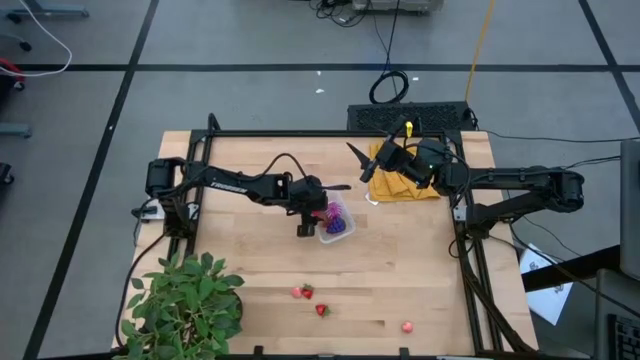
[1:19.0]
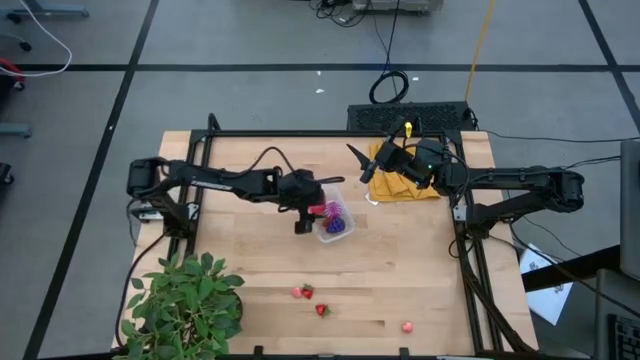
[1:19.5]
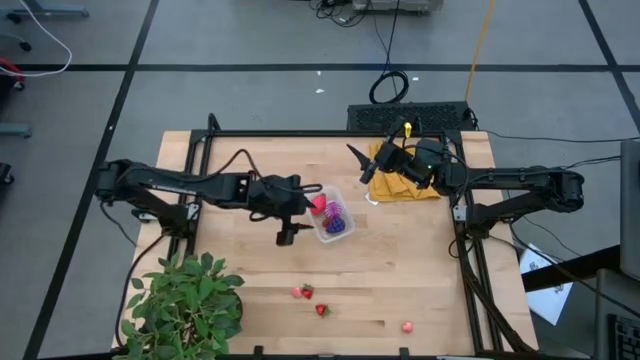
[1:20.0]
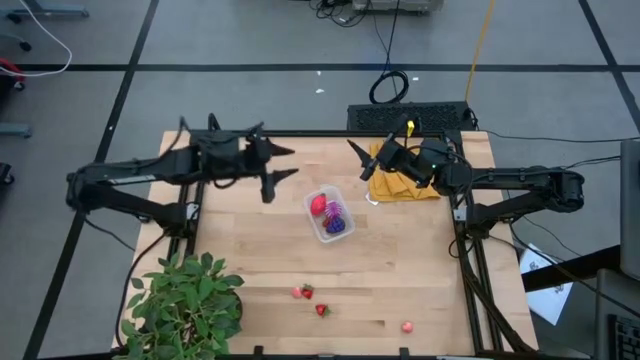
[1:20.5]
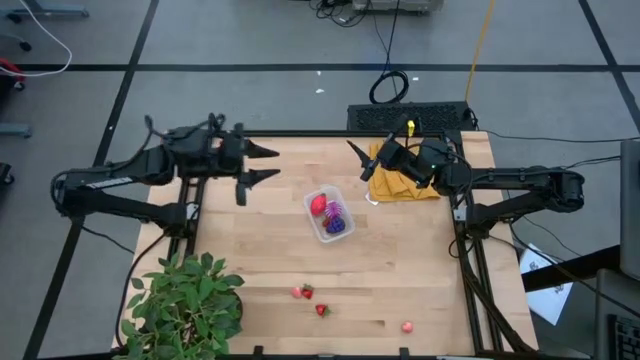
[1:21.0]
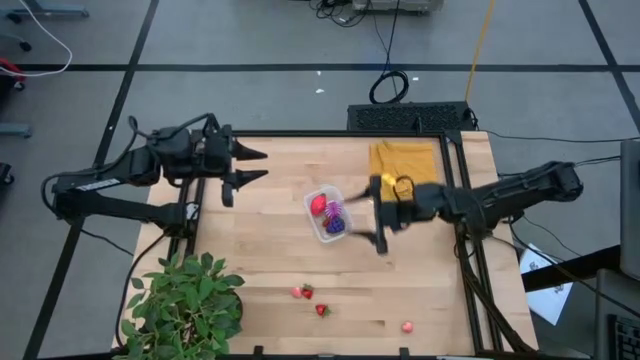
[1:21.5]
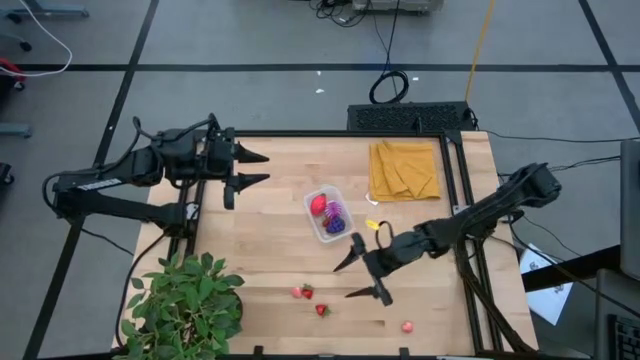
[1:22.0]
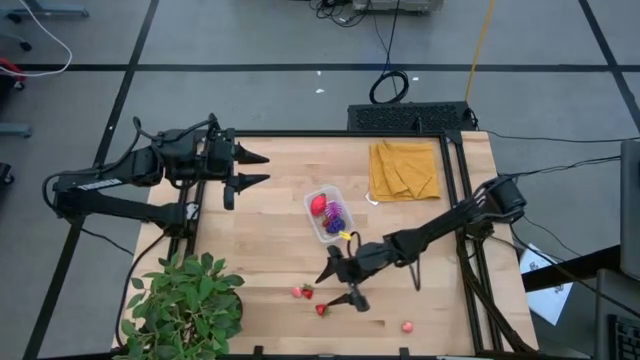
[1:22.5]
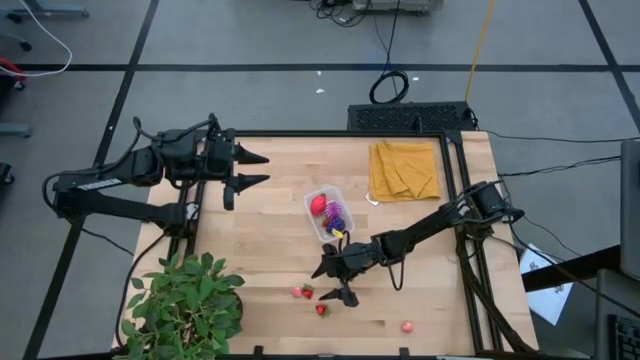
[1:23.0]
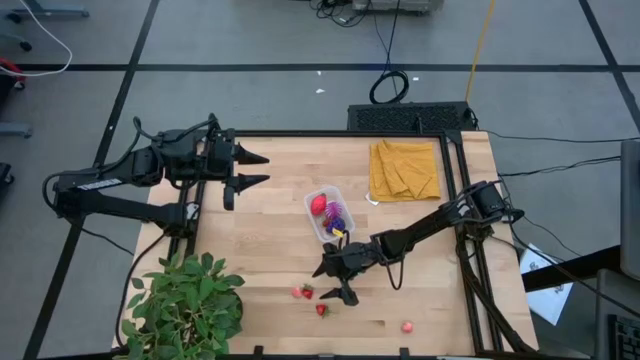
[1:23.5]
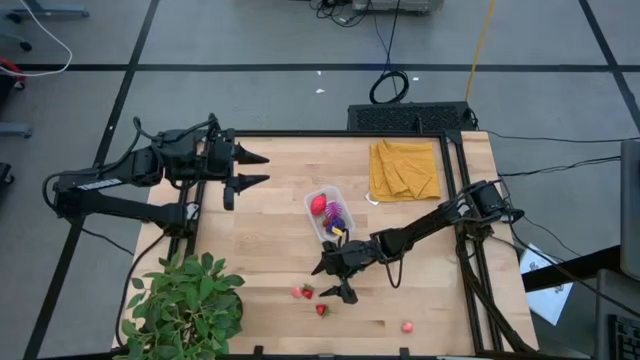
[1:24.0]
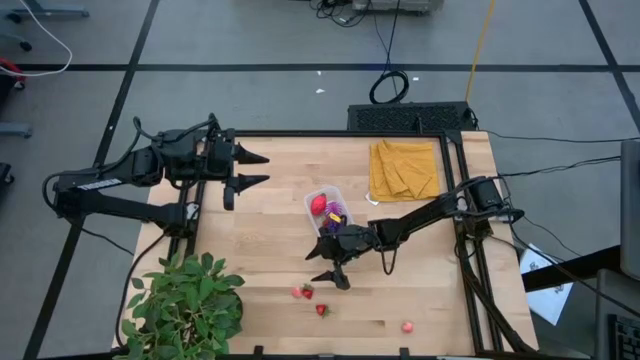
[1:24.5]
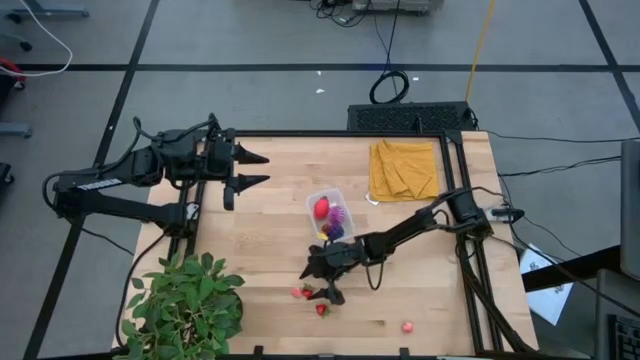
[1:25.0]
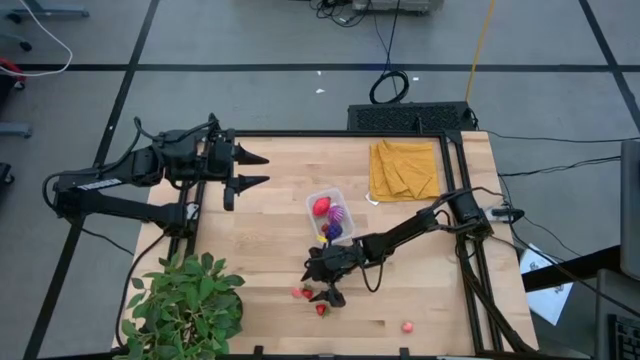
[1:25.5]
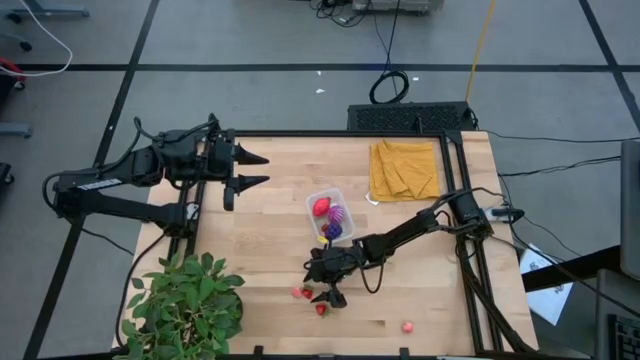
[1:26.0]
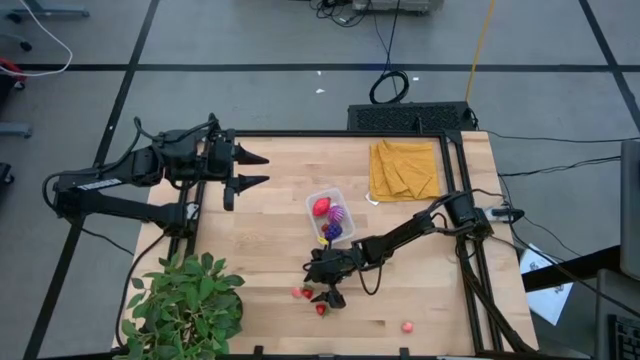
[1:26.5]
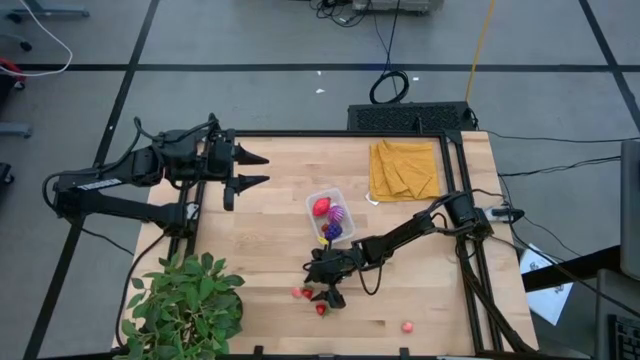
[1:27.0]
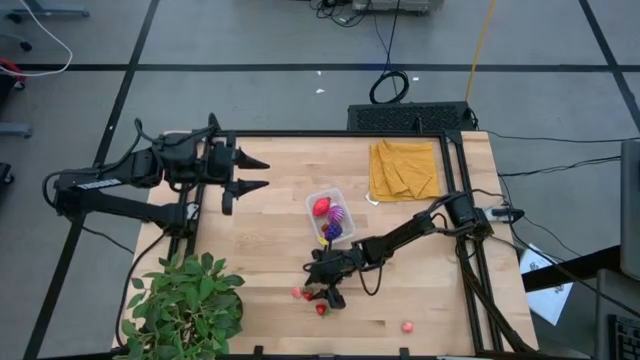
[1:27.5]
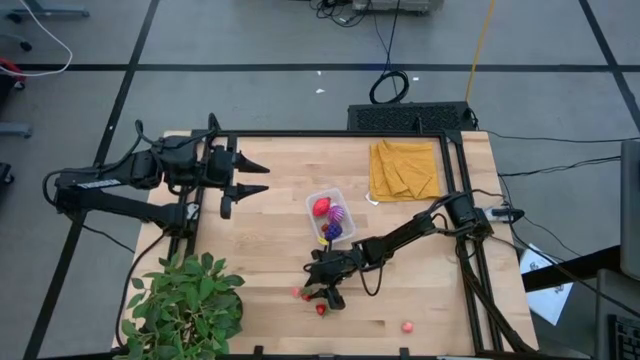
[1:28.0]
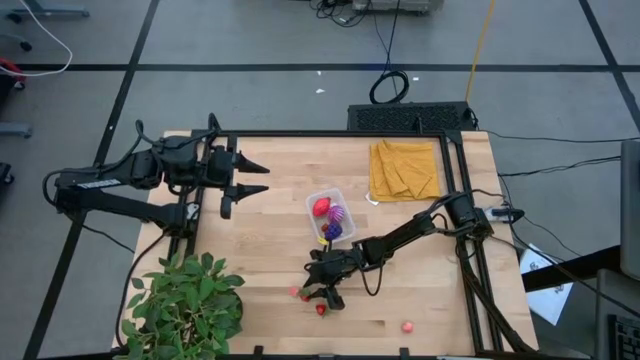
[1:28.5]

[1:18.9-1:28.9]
Task: Pick and placing Produce into tupperware
Put the top red strawberry into the transparent container

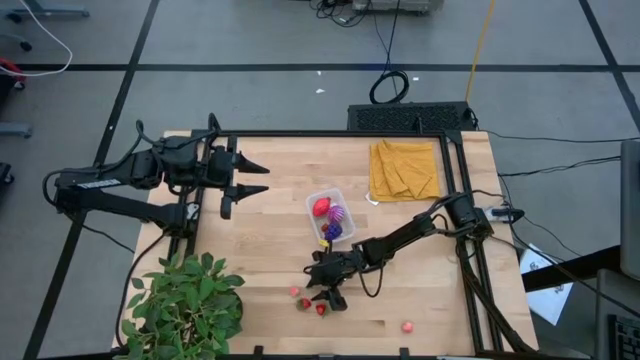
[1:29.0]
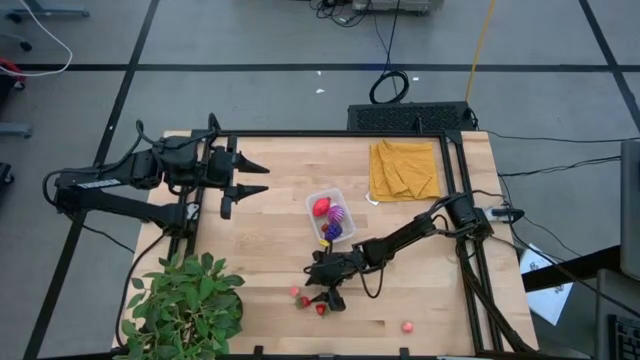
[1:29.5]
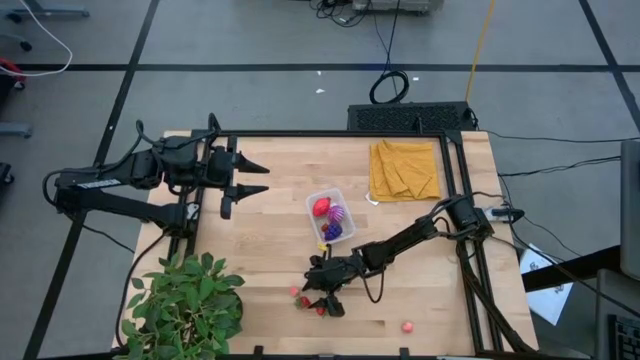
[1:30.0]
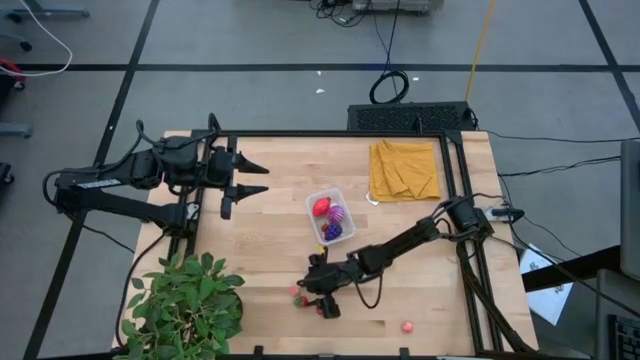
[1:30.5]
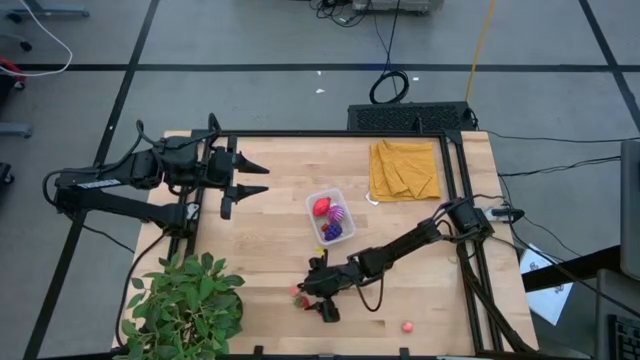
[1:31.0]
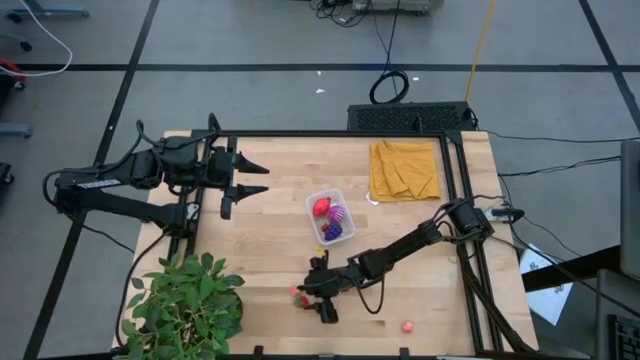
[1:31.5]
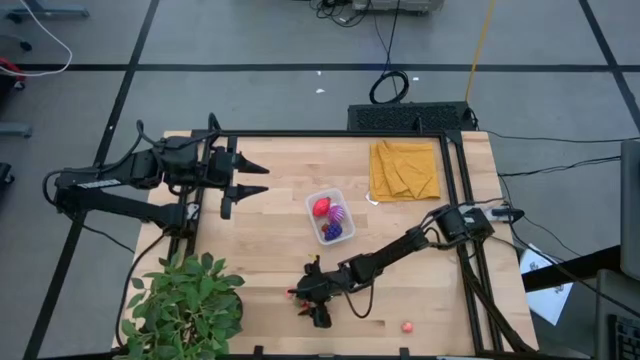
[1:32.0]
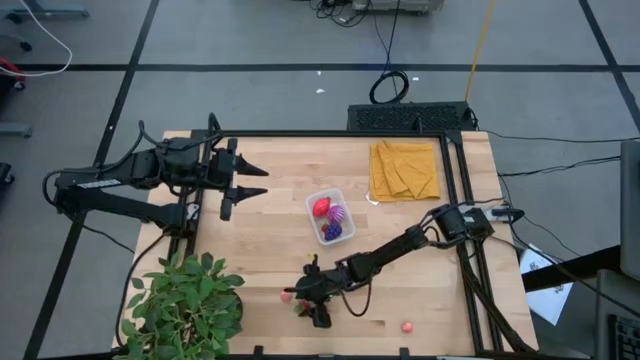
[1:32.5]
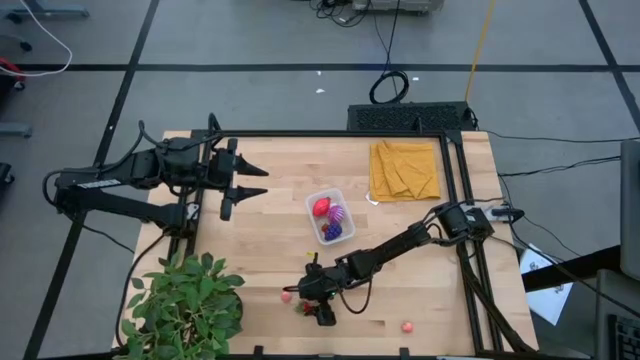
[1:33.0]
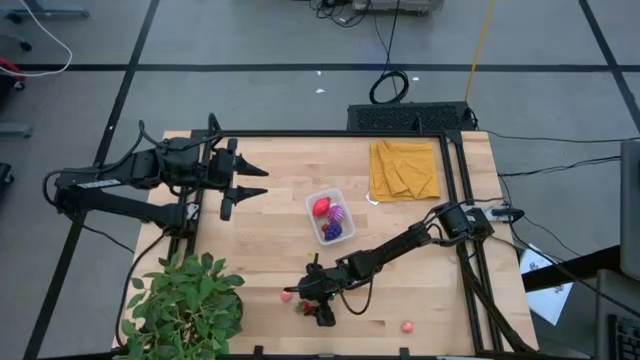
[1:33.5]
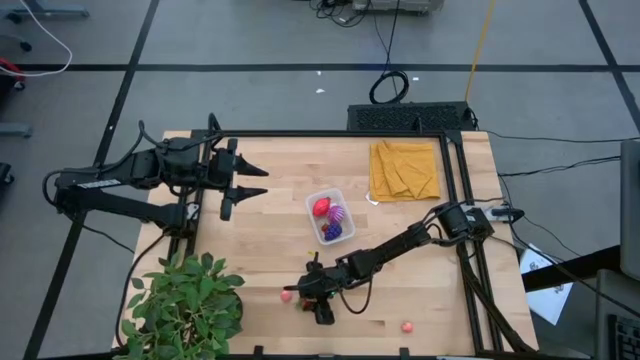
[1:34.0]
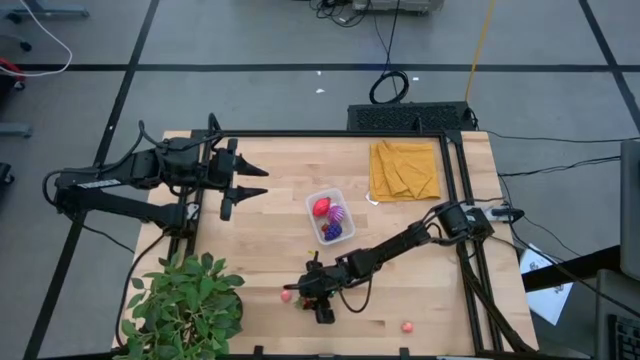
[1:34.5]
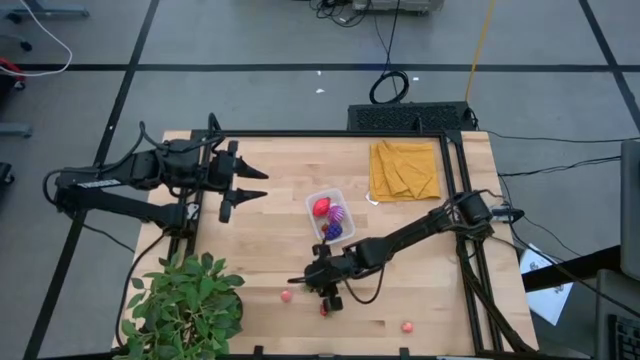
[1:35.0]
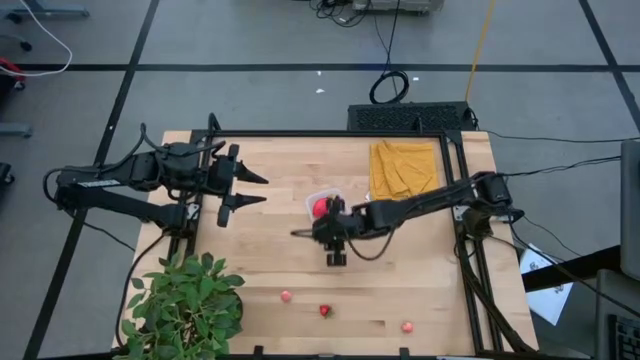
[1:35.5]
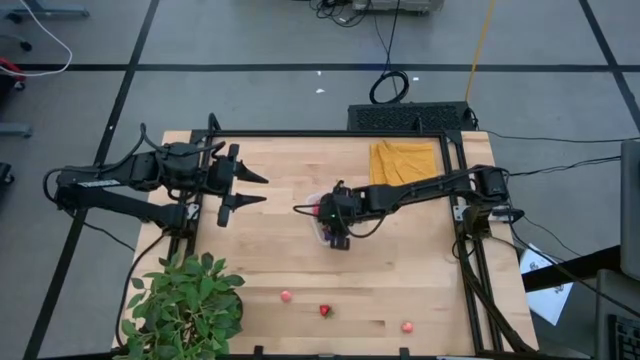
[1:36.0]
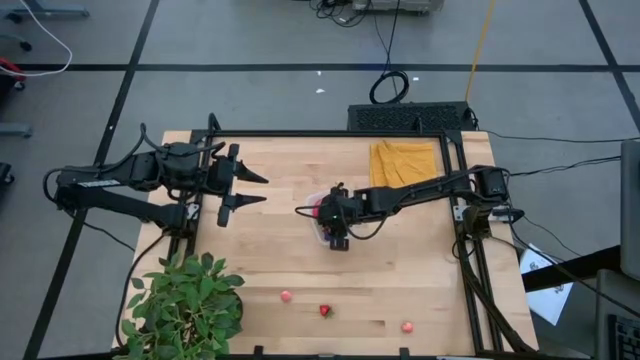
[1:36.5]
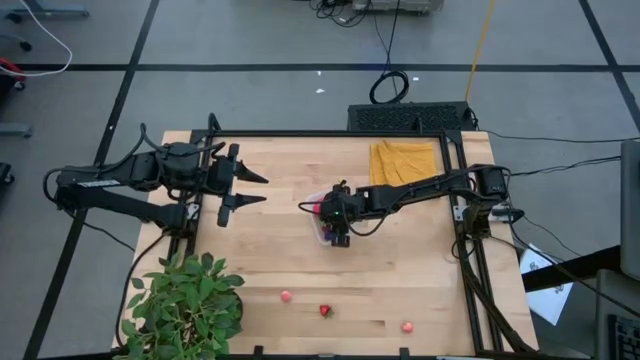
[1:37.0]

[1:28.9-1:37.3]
Put the top red strawberry into the transparent container

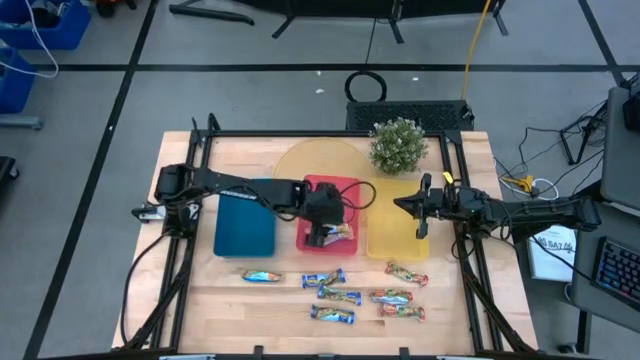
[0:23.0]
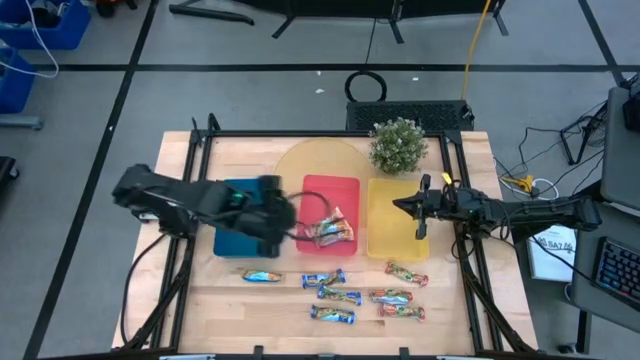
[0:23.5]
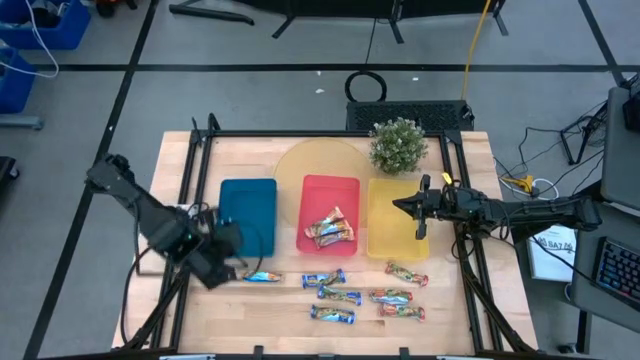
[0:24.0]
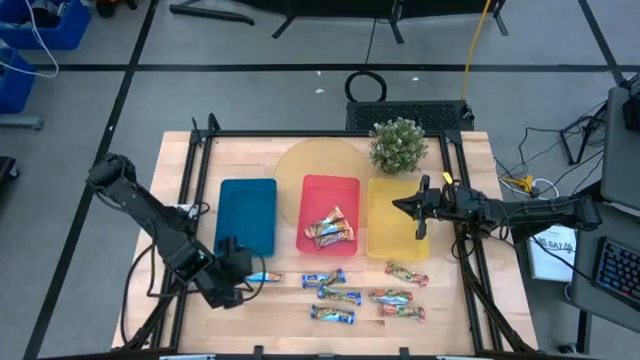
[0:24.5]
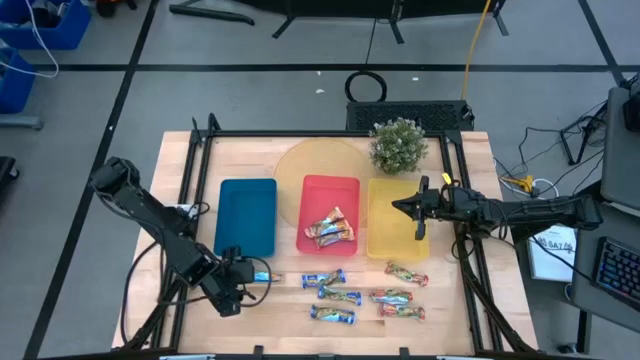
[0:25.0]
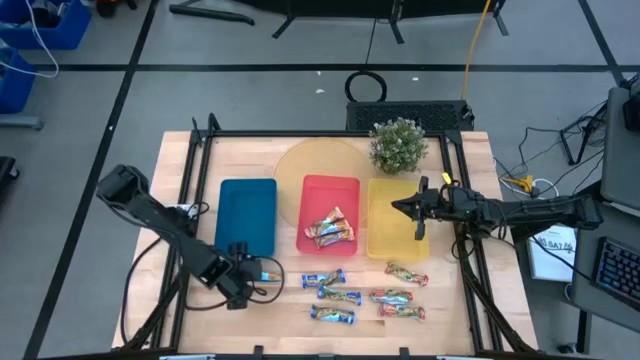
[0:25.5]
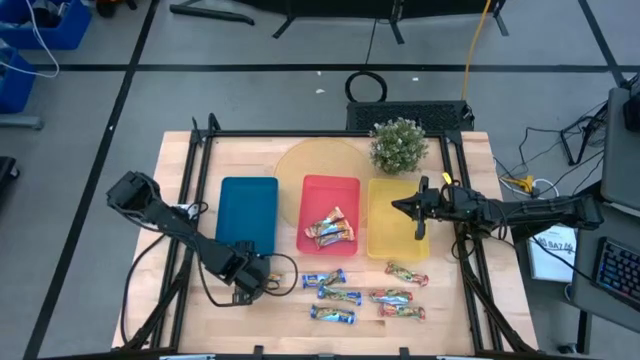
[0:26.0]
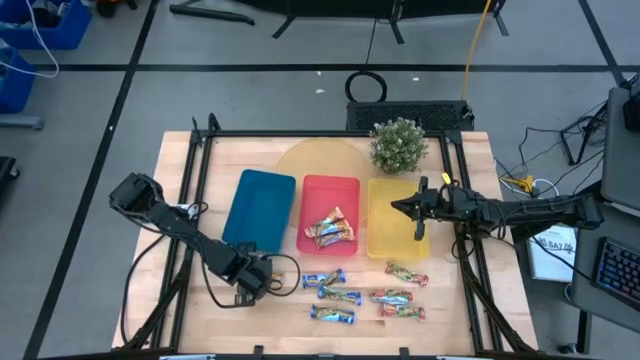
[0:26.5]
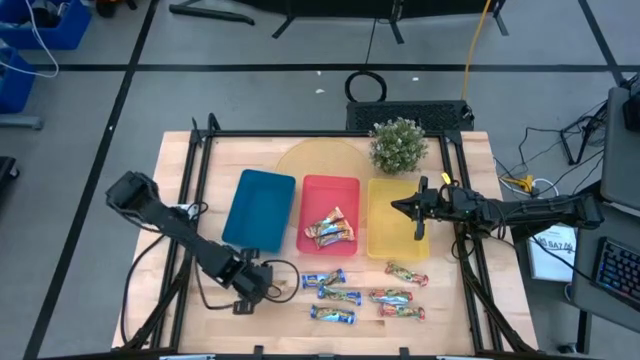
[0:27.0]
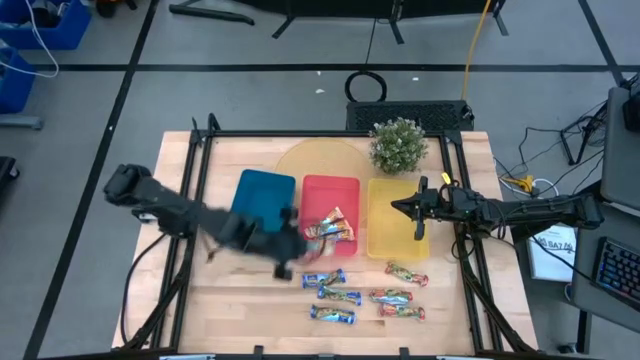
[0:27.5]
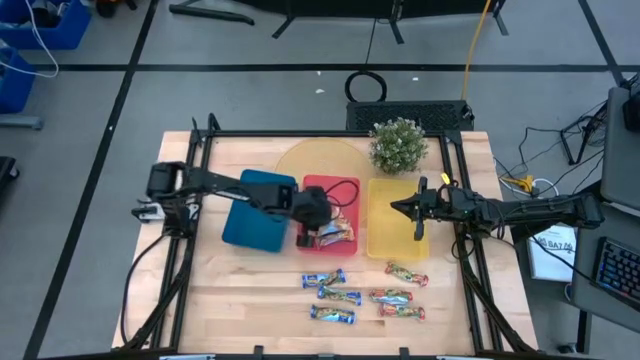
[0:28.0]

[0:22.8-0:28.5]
Task: Pick and place Granola Bars by type
Put the yellow granola bar into the red bin
